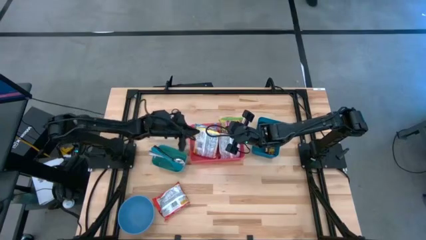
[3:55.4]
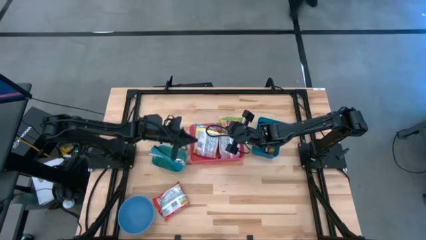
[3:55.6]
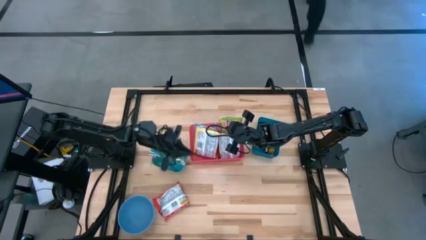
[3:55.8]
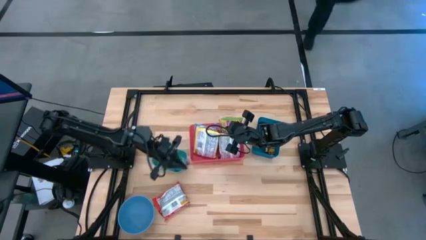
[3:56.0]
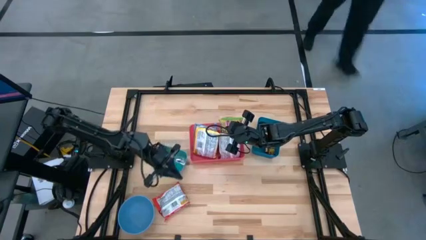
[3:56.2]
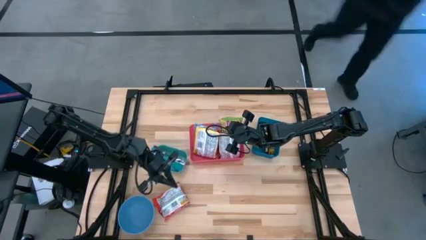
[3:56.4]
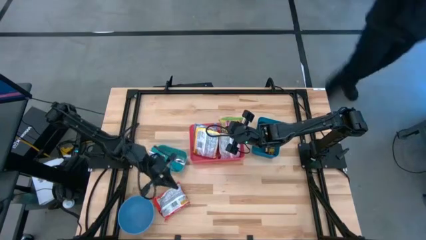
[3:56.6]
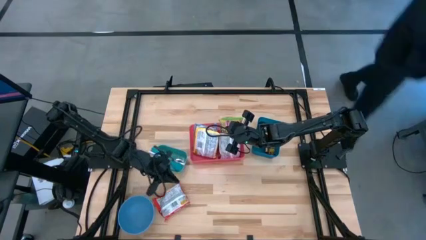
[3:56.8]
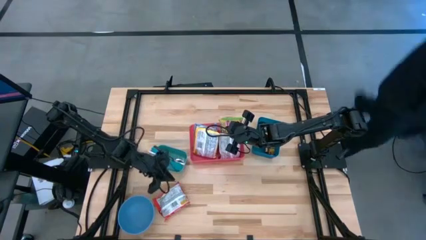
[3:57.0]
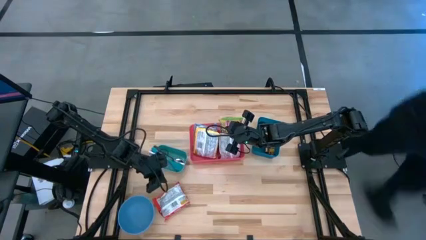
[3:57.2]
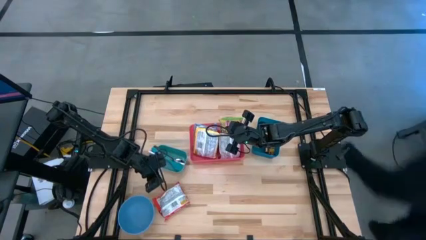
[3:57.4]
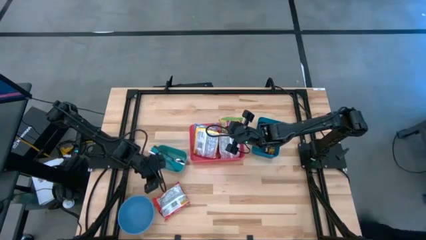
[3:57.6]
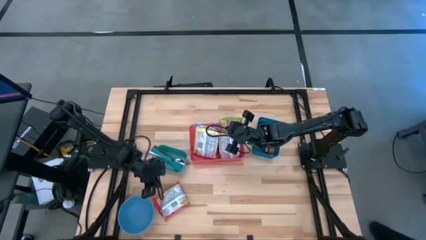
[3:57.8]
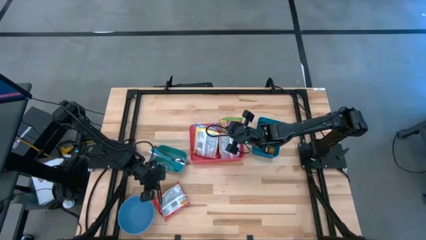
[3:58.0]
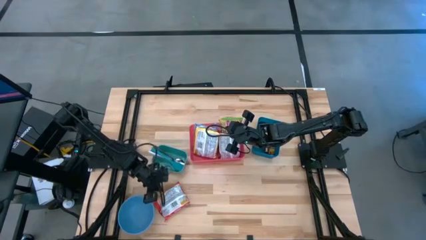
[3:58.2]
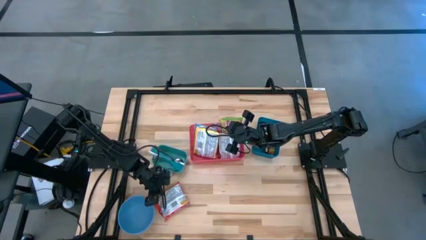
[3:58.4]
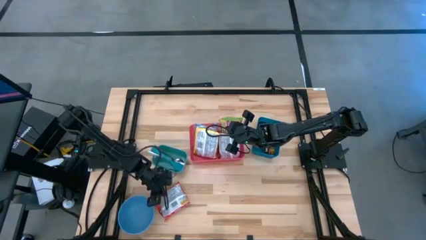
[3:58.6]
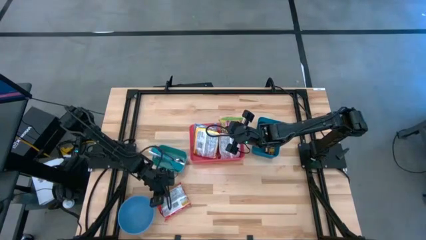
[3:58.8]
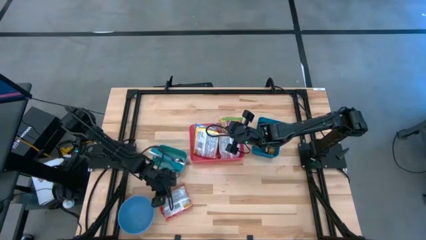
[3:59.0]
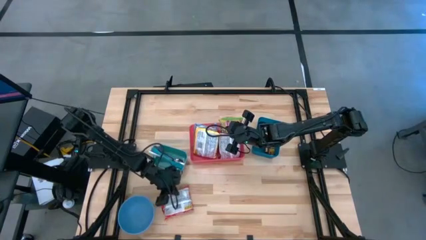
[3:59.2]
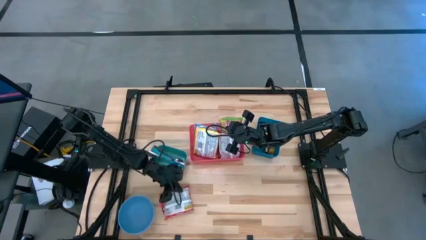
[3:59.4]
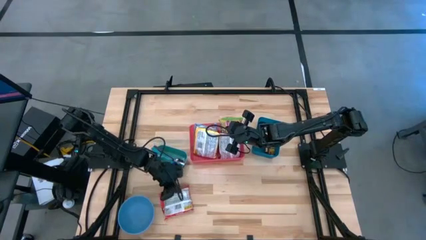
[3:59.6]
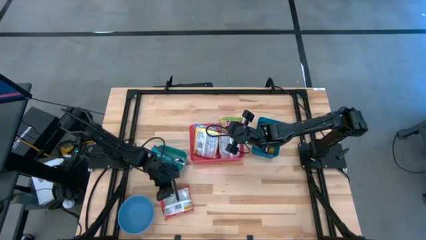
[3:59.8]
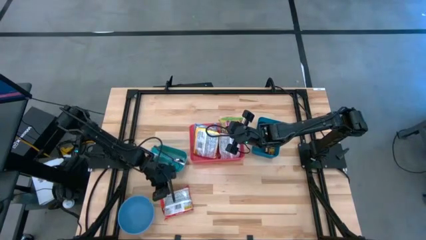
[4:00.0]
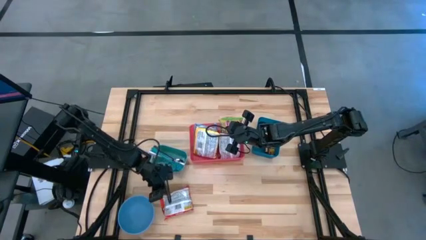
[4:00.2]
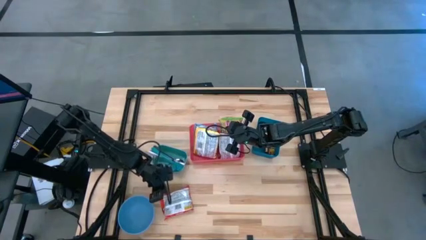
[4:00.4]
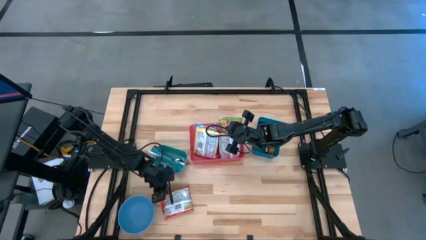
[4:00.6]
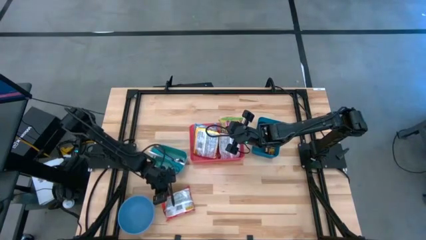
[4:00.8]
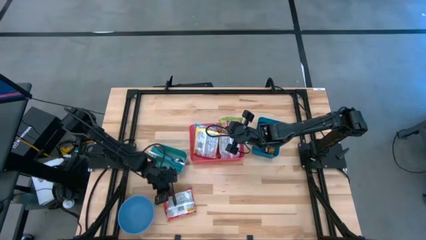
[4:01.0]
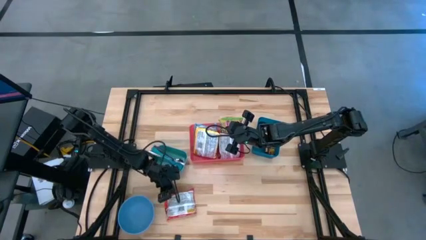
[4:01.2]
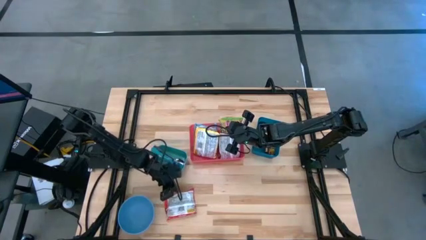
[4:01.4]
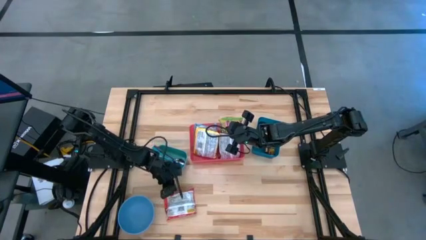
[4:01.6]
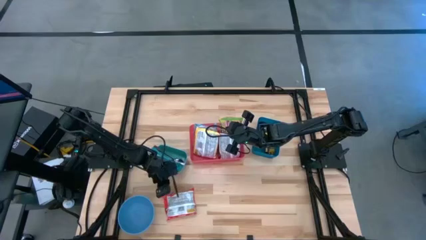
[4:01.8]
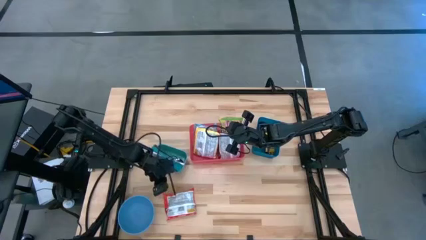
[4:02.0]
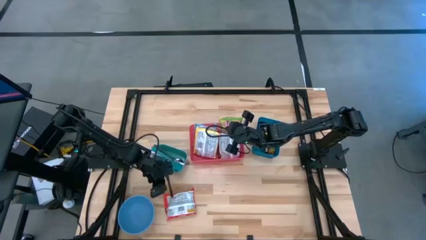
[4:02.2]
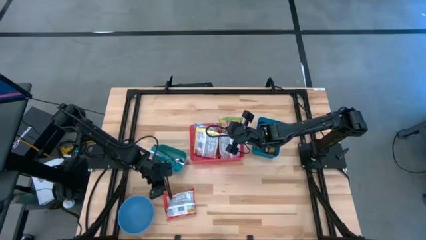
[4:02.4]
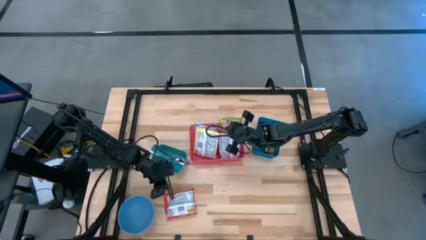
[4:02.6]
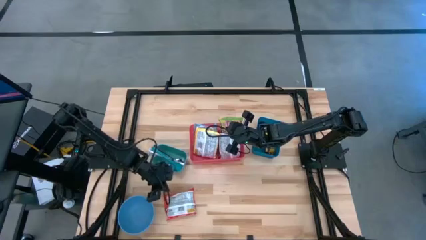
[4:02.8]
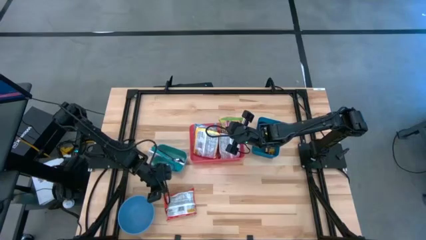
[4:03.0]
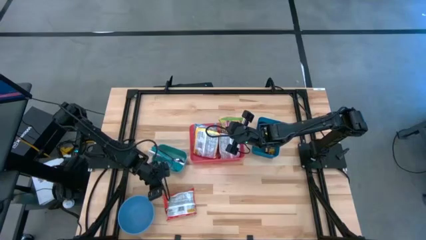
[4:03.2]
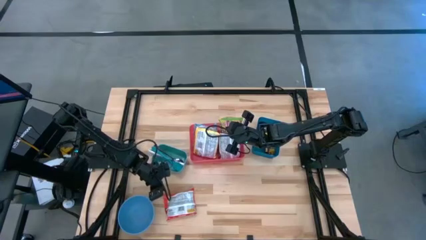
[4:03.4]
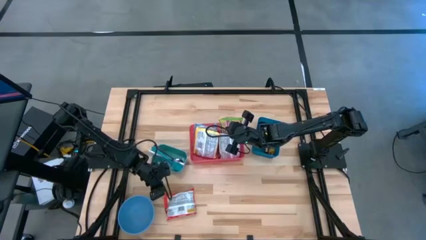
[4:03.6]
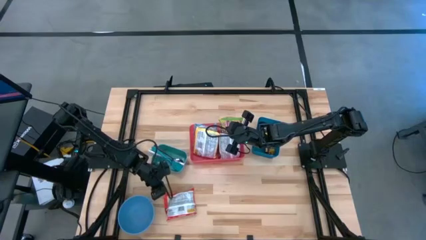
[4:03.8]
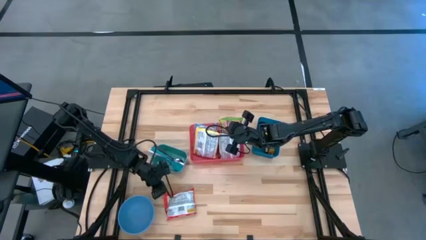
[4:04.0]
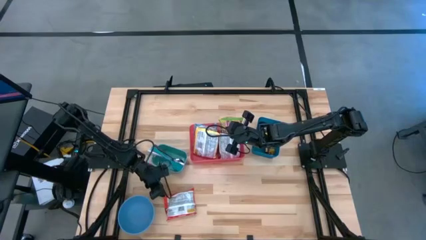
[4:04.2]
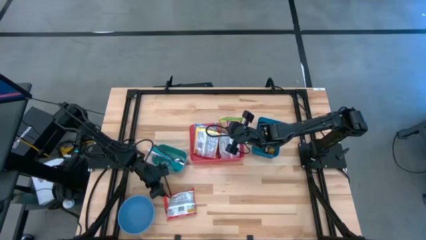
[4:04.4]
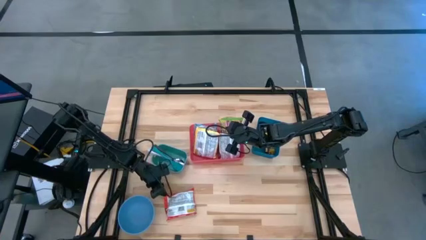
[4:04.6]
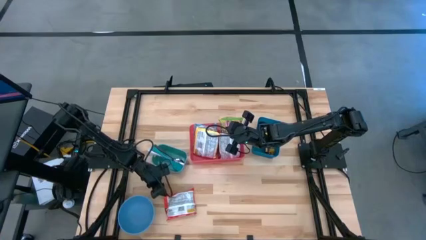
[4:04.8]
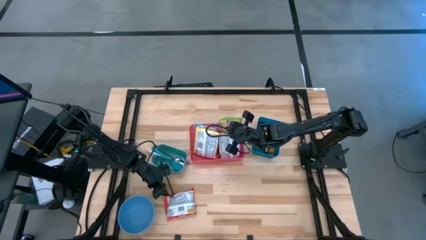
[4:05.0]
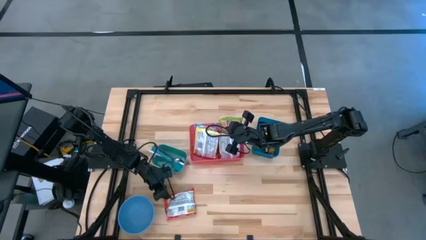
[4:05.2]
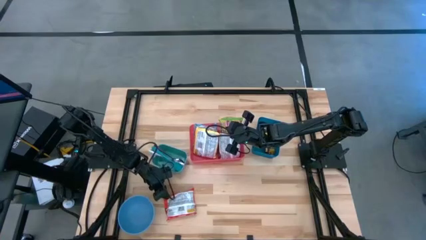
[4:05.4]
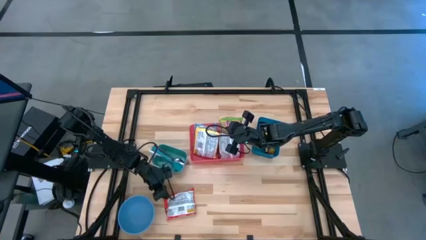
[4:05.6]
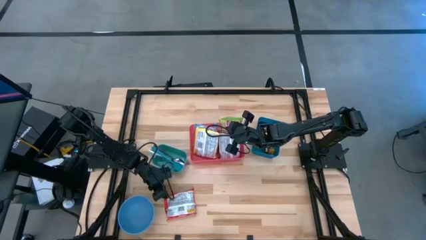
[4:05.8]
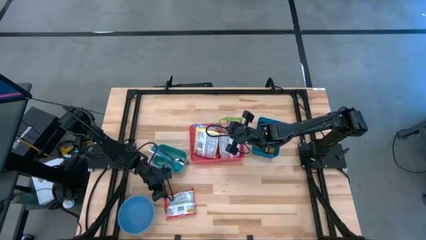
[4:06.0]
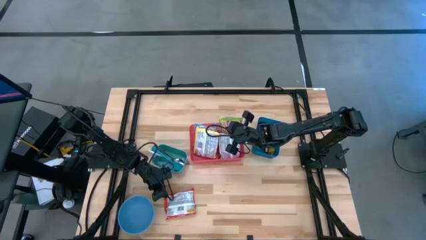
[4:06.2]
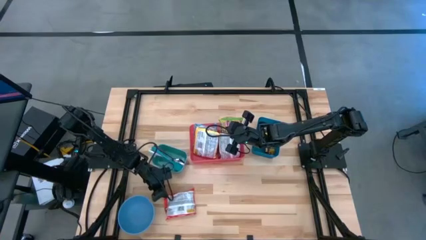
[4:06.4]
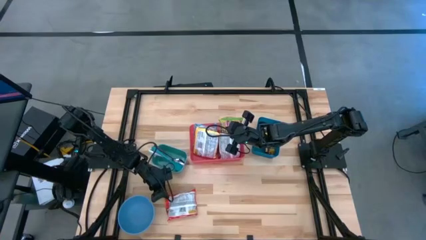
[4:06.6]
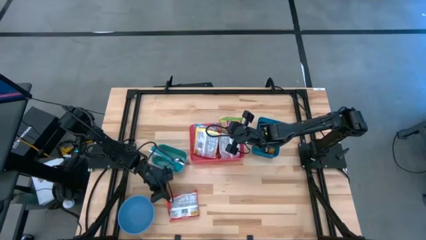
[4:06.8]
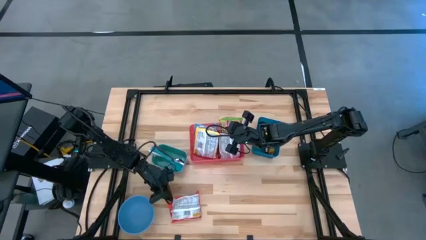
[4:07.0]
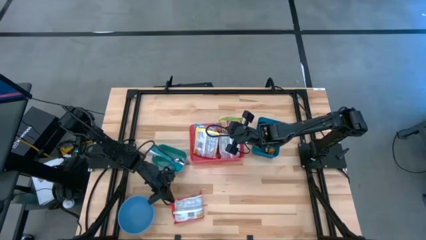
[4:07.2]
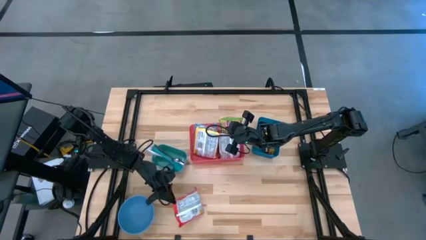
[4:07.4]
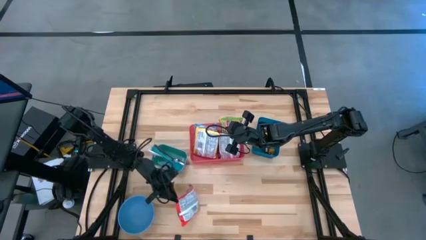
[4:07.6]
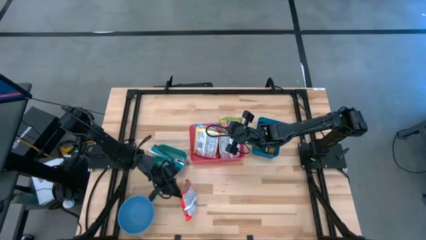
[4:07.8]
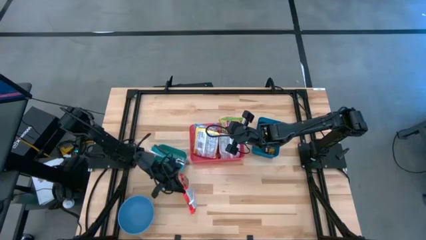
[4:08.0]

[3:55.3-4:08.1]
Task: Pick & Place Food Item
Put the orange noodle pack into the red bin

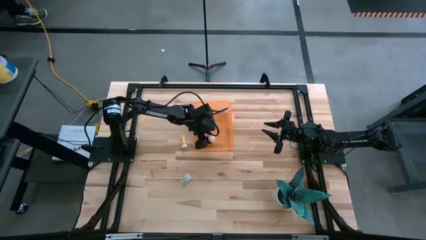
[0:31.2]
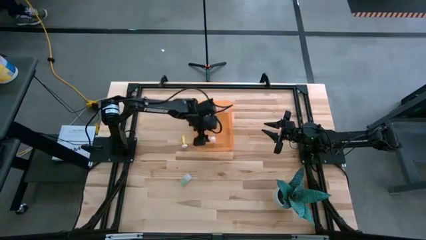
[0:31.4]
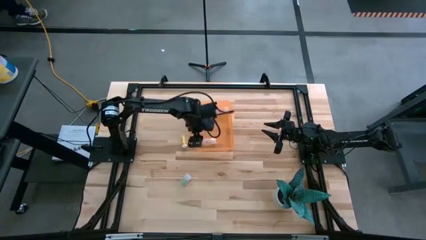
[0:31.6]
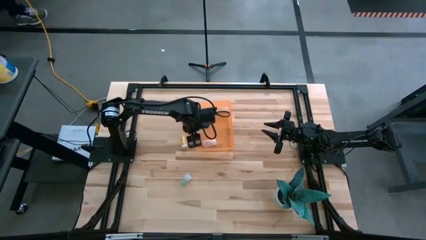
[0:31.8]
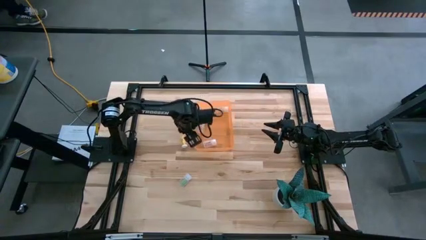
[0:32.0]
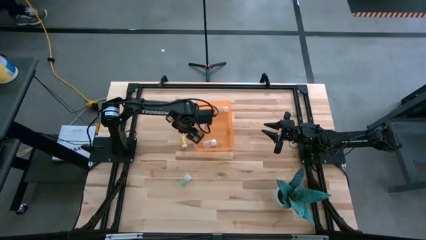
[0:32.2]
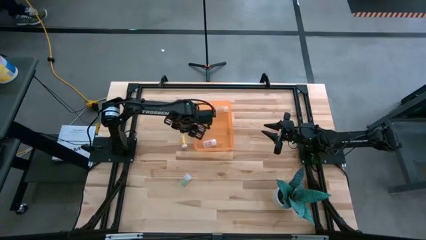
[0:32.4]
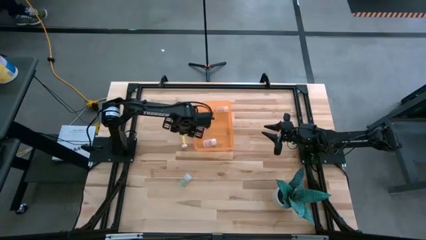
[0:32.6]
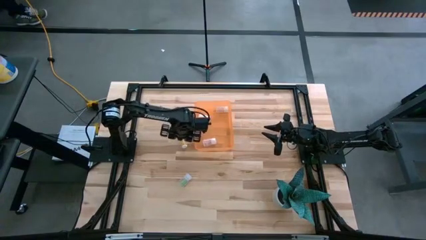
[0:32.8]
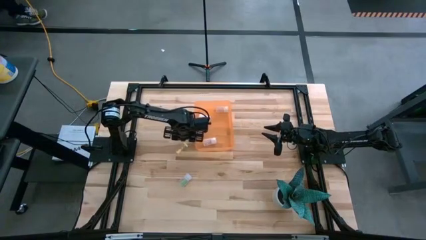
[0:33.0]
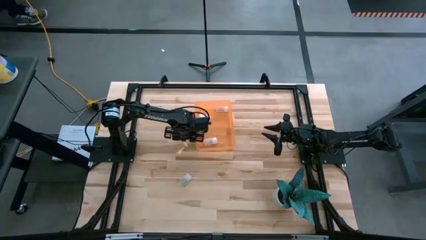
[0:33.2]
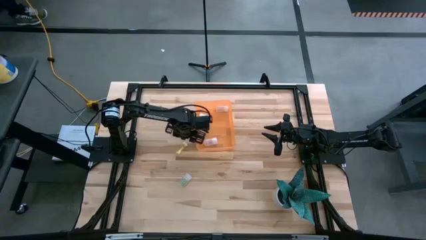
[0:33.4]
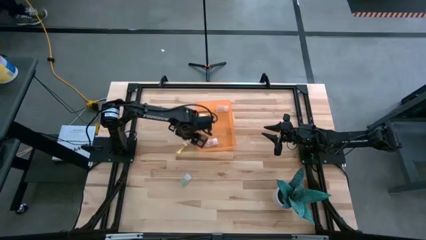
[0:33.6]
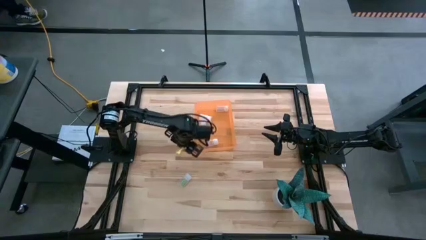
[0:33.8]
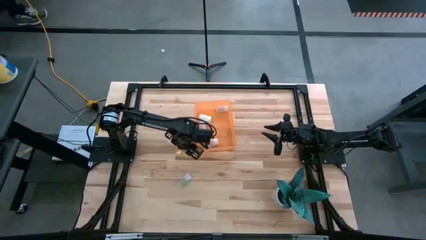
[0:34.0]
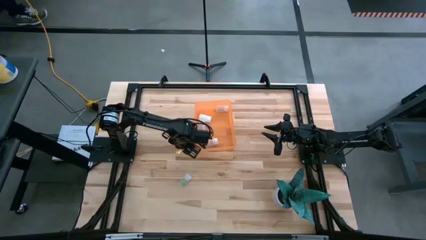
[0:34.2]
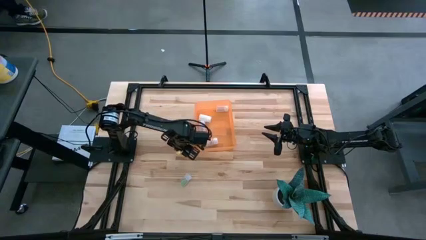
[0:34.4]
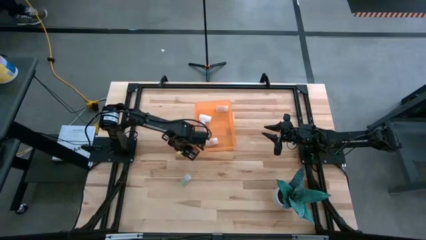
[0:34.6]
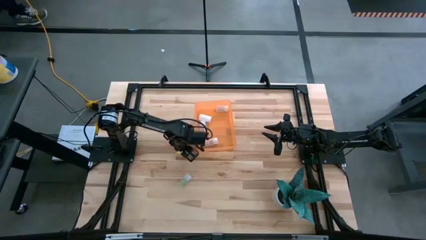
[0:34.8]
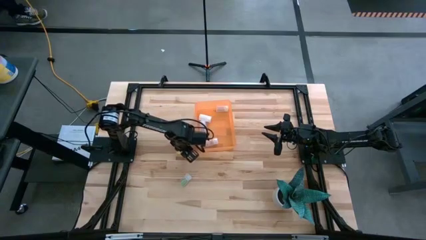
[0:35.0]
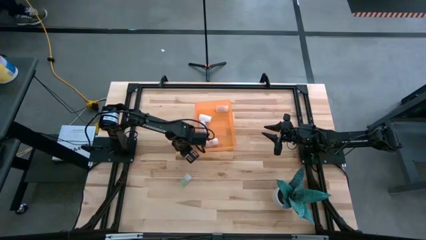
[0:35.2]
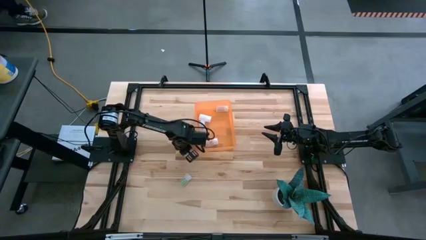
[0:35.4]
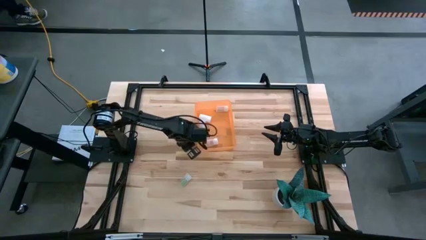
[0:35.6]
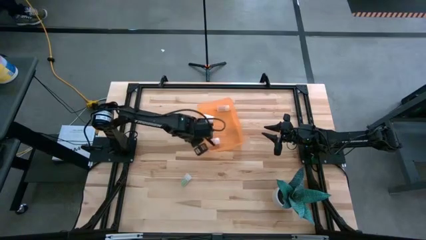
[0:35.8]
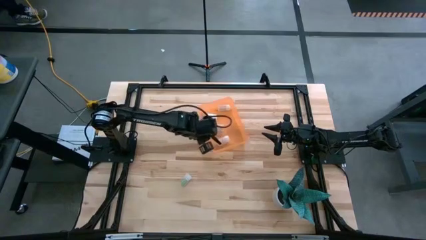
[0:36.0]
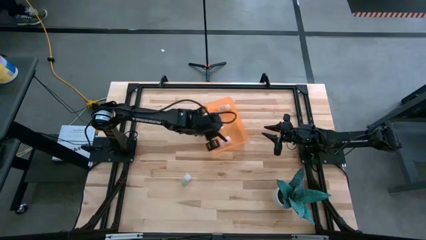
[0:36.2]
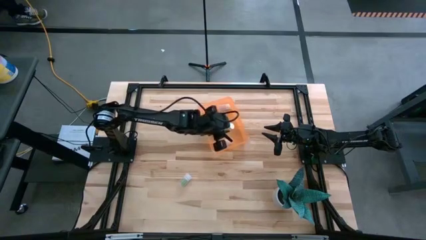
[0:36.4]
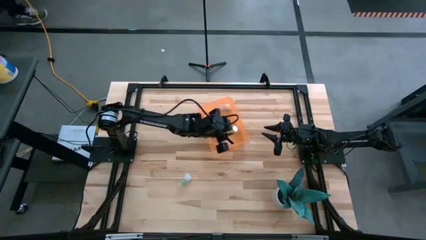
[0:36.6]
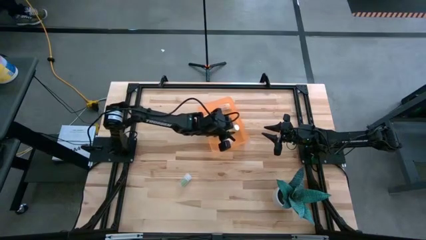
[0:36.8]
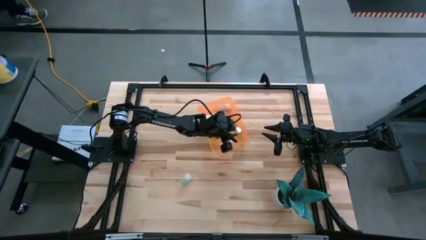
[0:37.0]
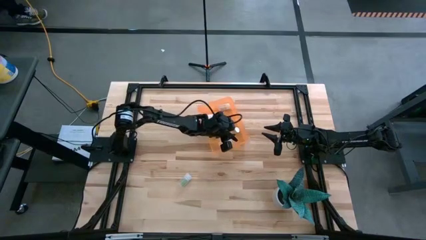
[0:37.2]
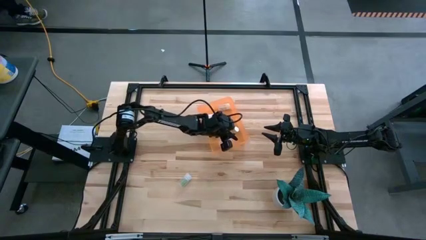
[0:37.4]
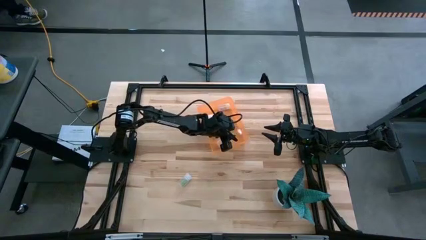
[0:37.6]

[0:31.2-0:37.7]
Task: Pick and place pill bottles into a basket
Put the yellow pill bottle into the orange bin
